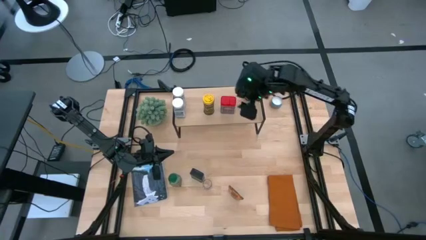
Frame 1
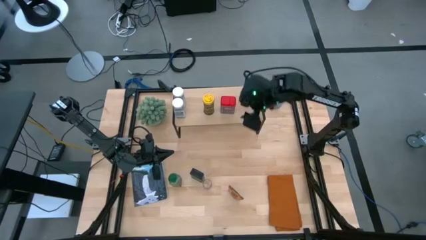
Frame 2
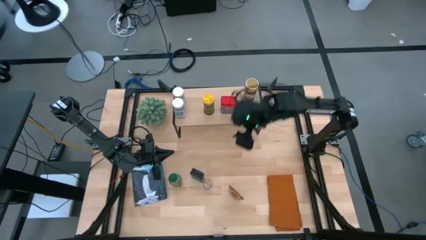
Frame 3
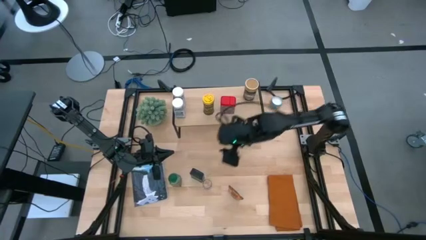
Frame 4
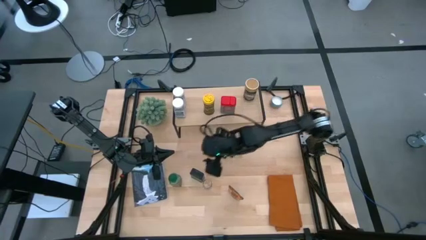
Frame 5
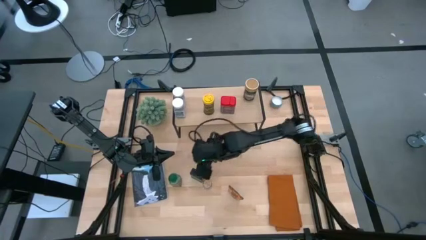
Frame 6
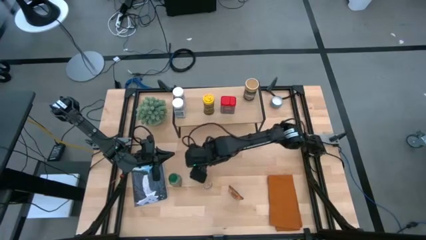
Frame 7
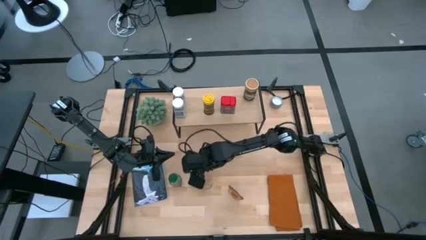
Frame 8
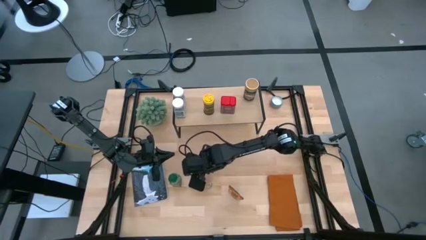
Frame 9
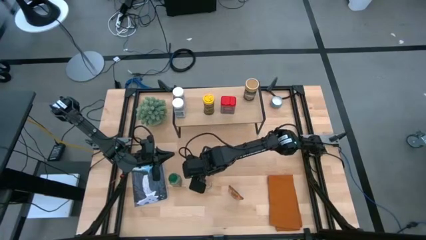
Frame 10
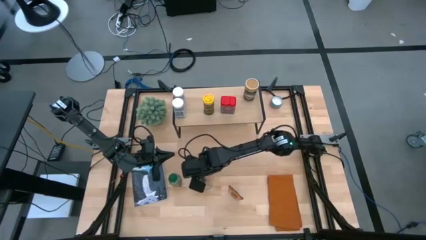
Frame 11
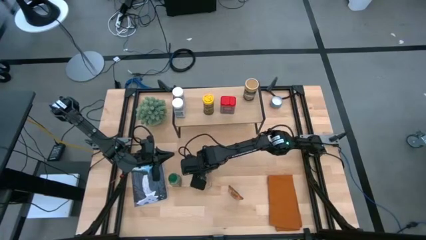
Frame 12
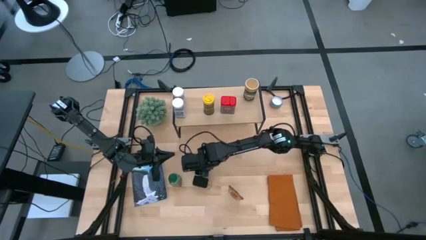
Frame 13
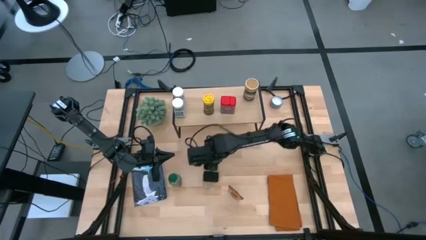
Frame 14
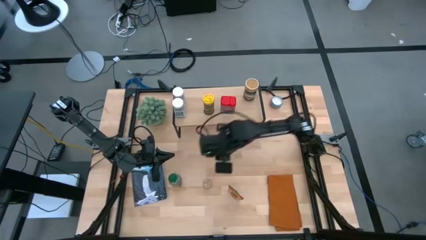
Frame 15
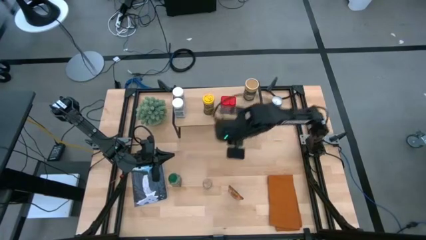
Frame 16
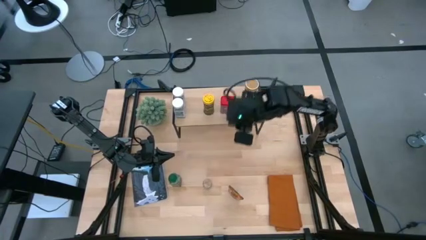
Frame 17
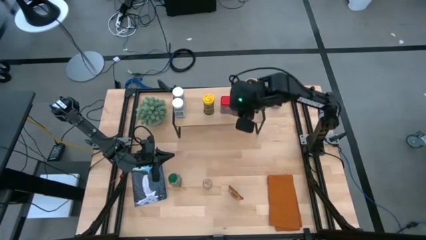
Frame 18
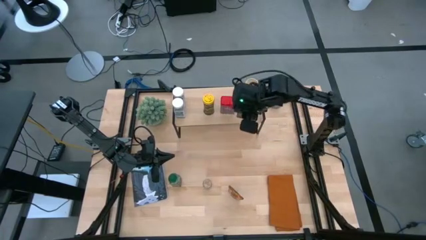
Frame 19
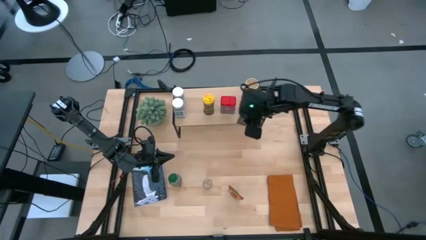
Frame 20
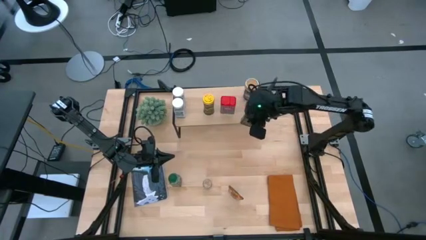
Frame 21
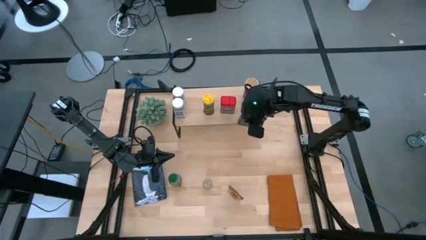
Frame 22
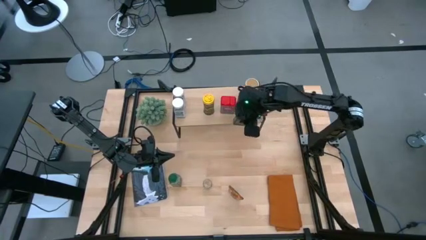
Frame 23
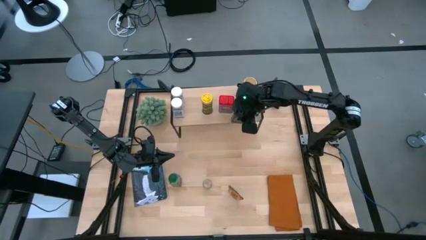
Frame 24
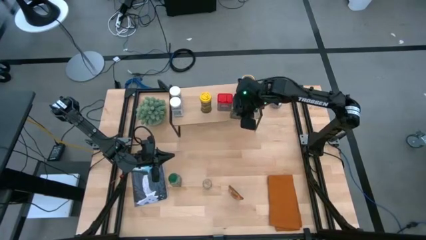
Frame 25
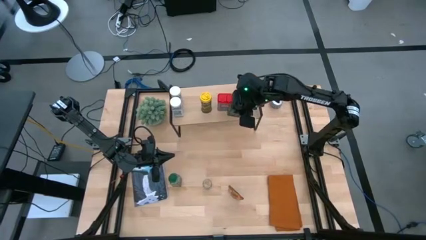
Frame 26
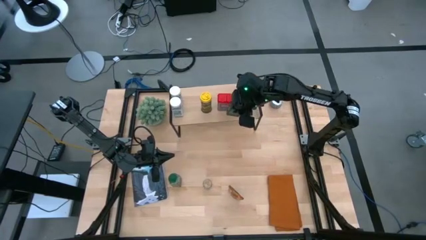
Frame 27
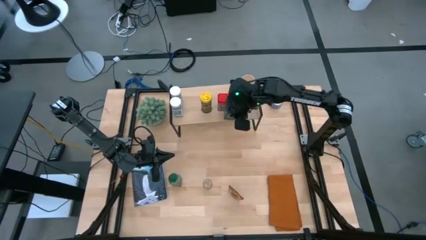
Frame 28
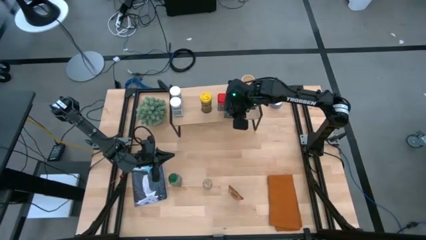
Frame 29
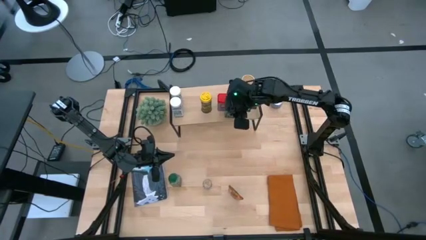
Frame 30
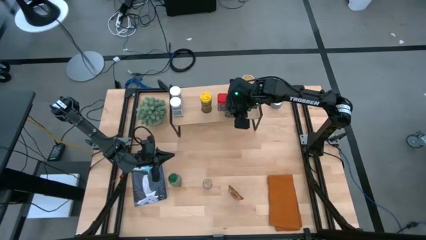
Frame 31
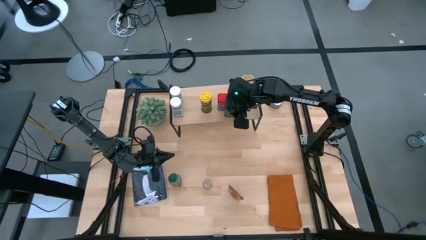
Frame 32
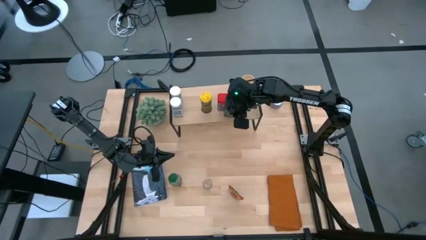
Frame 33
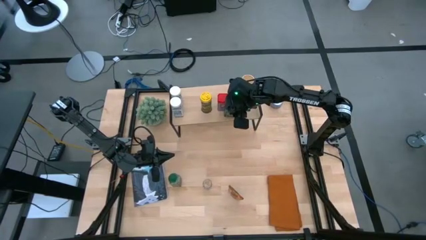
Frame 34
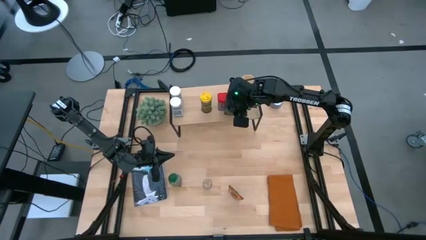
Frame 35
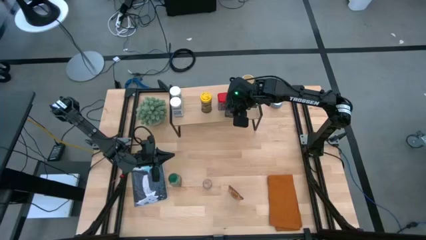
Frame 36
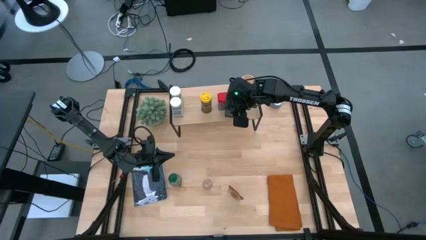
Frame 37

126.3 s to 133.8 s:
Task: Shelf spices
Put the black seasoning can on the shelf aligned with the red seasoning can

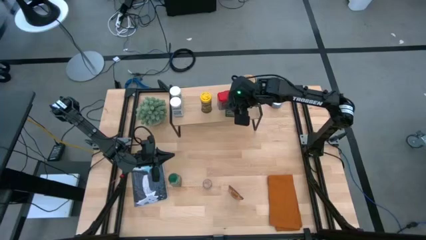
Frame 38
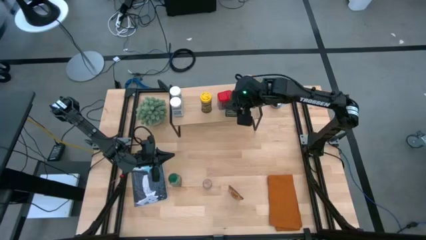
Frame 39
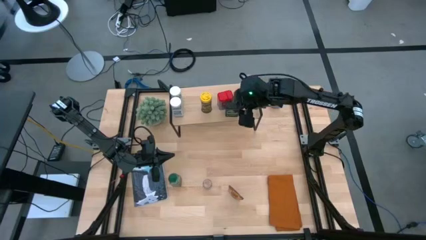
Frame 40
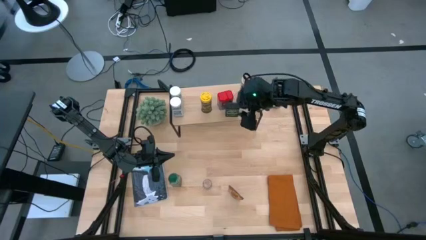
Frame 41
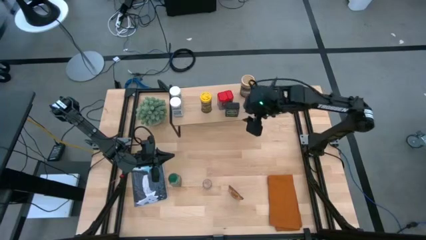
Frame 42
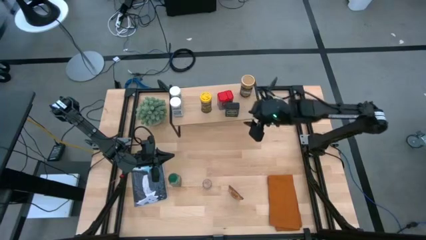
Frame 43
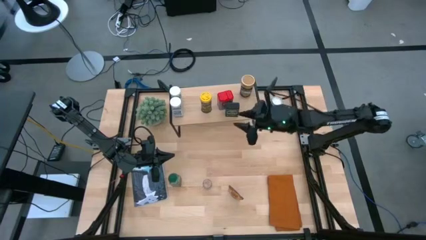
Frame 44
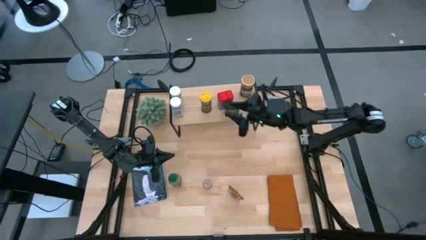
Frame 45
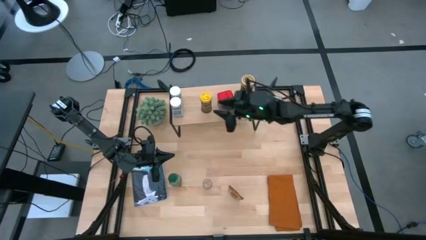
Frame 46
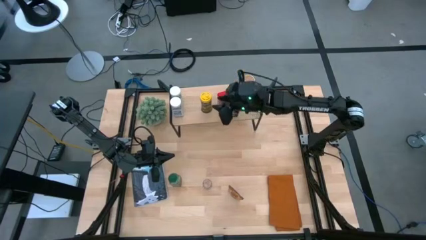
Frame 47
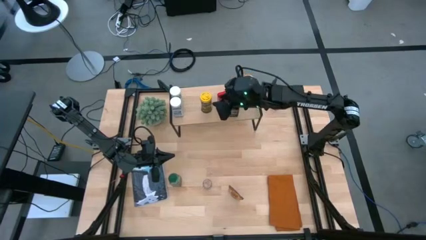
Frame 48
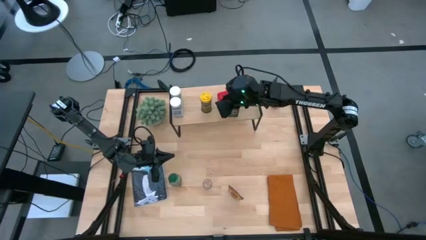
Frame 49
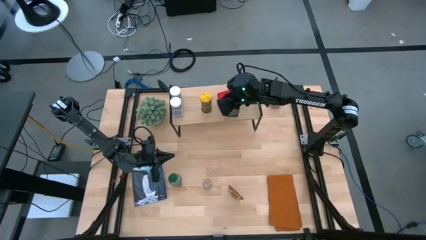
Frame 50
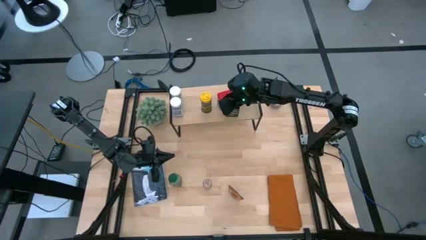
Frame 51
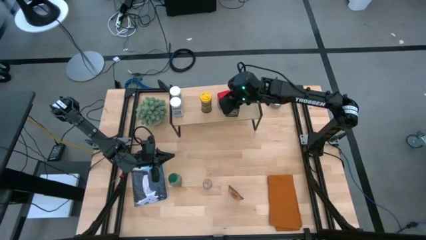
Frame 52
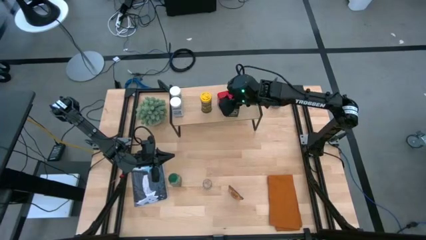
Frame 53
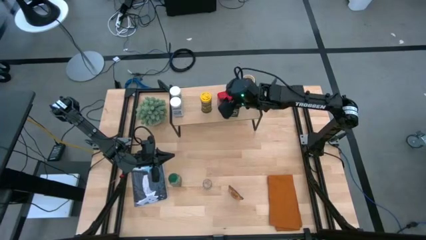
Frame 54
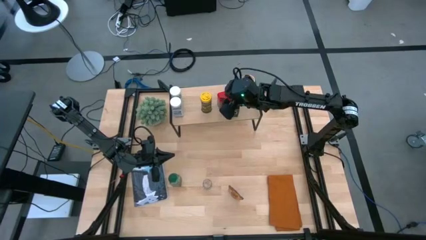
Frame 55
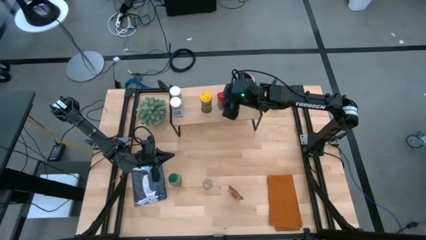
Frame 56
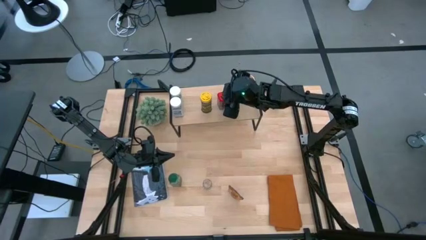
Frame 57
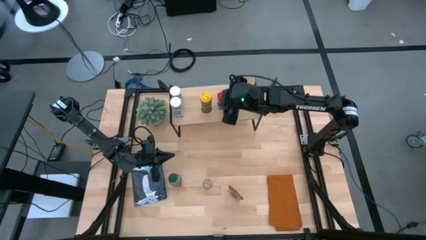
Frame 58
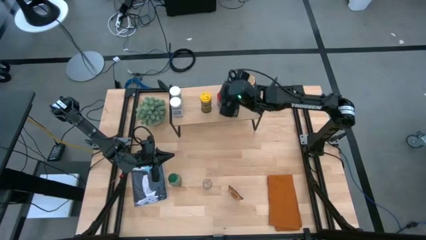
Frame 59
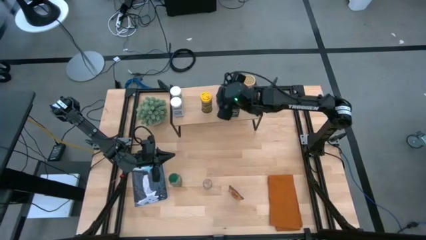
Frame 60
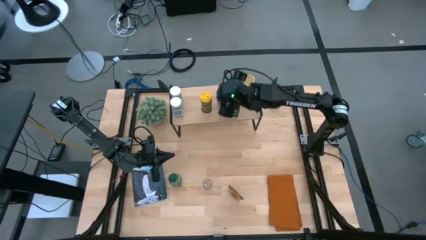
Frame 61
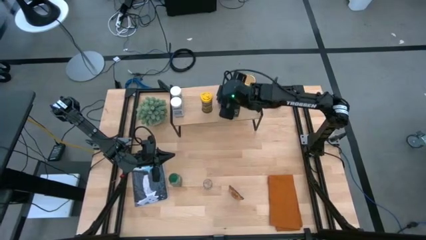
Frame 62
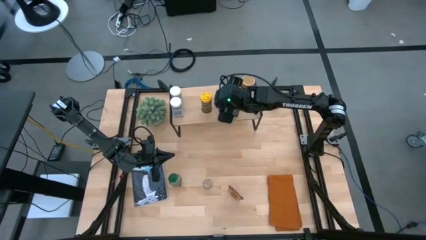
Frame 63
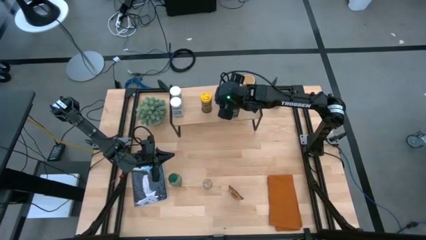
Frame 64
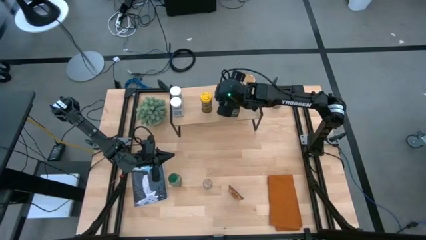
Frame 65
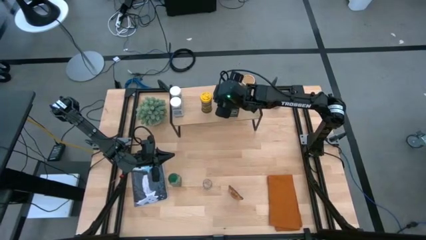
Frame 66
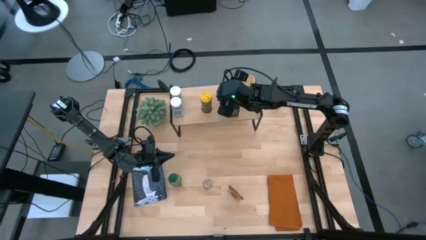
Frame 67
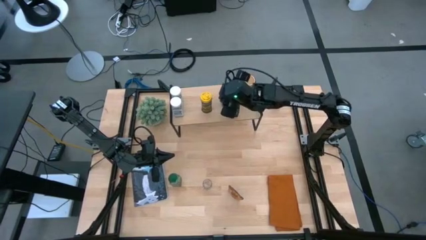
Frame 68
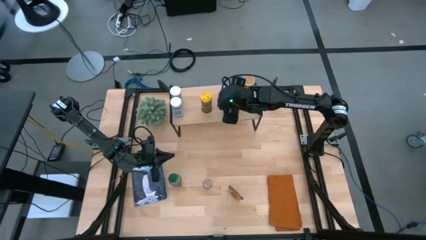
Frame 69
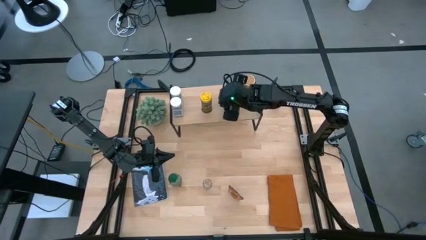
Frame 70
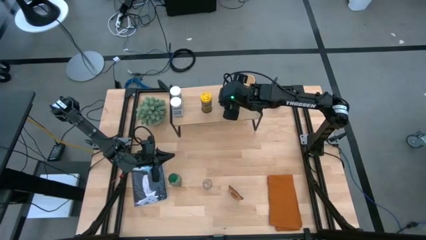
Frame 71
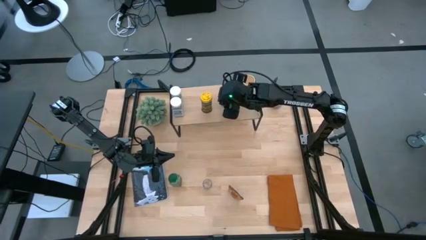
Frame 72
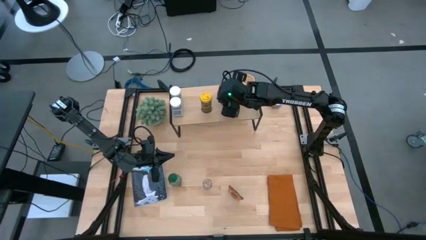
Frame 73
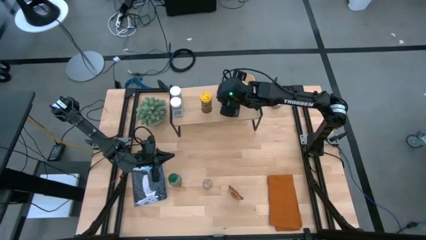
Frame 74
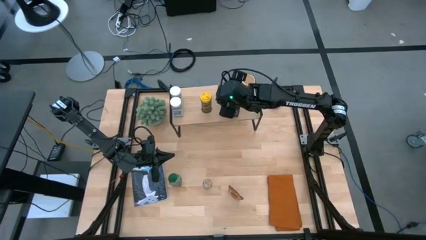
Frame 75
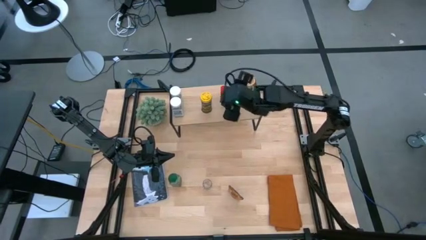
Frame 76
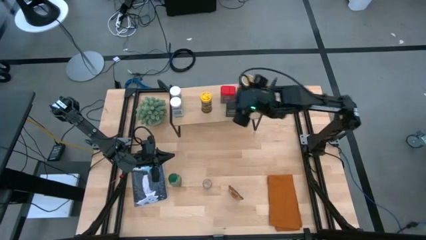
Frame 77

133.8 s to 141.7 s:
Adjust the red seasoning can

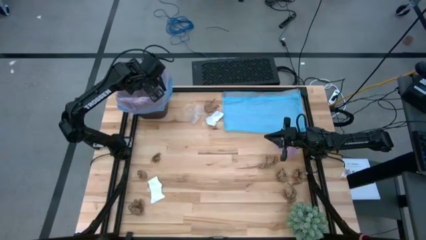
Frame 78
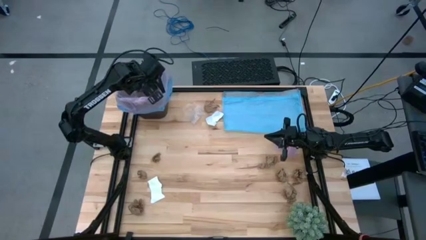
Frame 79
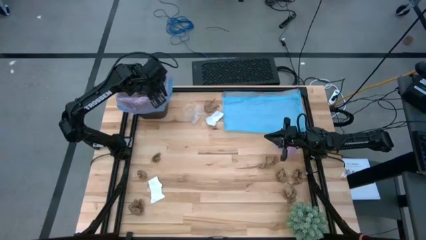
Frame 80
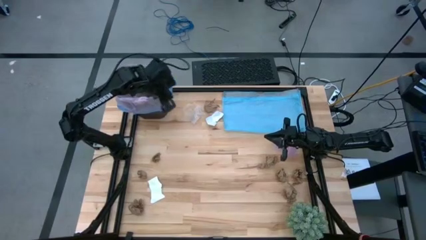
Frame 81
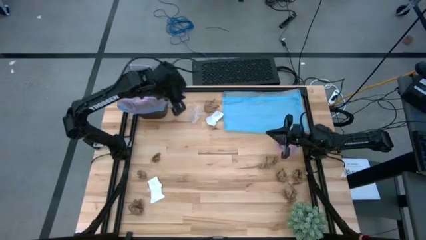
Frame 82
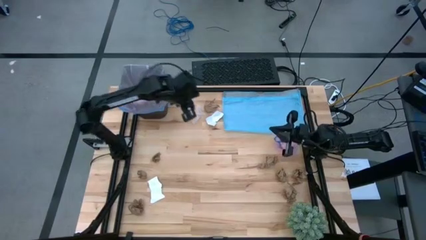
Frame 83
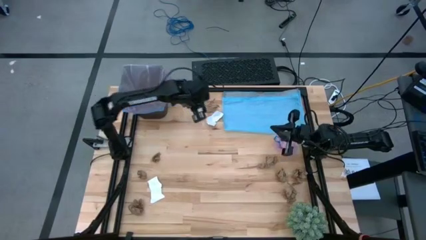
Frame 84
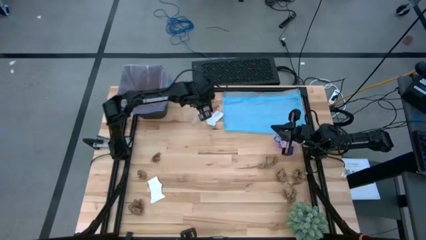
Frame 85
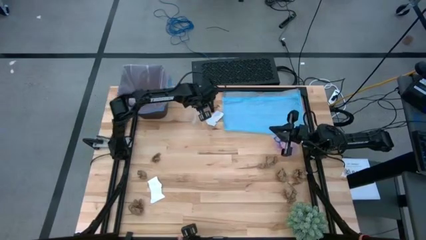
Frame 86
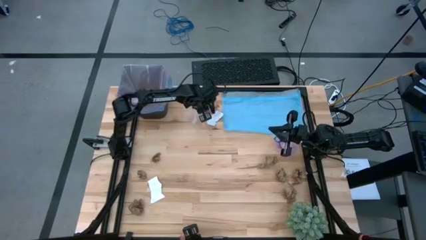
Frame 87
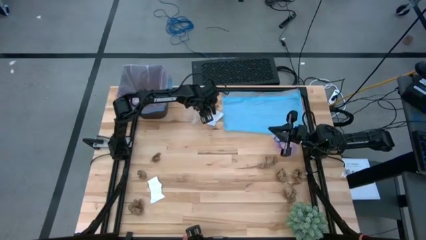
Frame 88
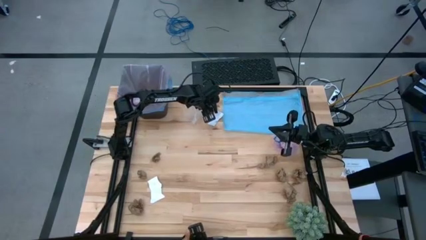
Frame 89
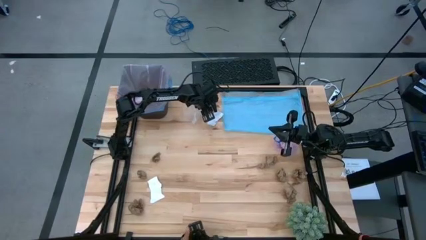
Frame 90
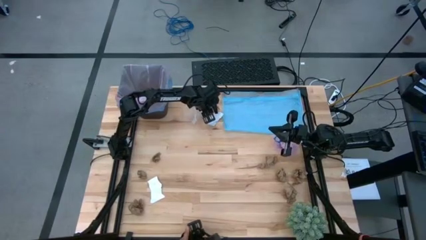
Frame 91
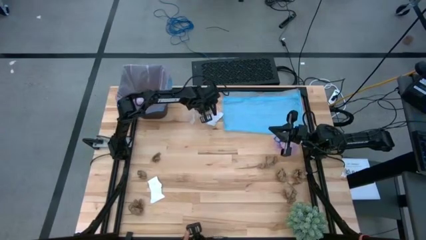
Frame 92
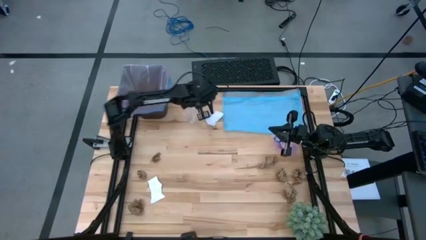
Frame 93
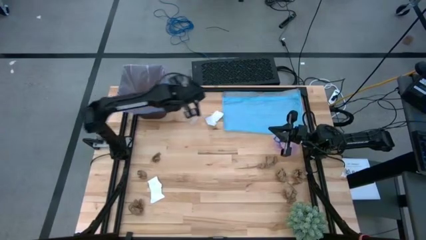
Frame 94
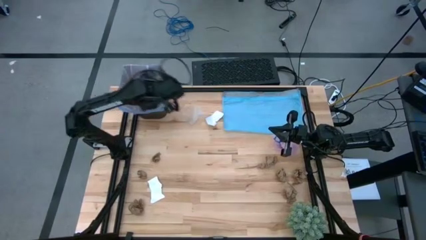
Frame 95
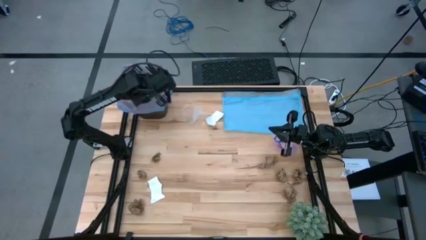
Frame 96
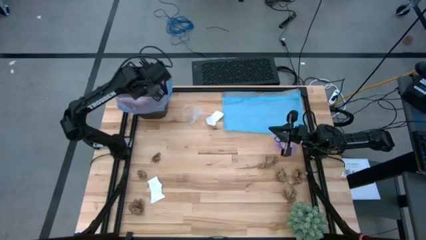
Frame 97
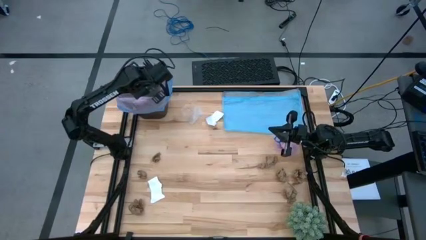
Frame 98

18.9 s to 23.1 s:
Task: place trash/remove bag and relplace
Put the brown napkin into the trash bin
